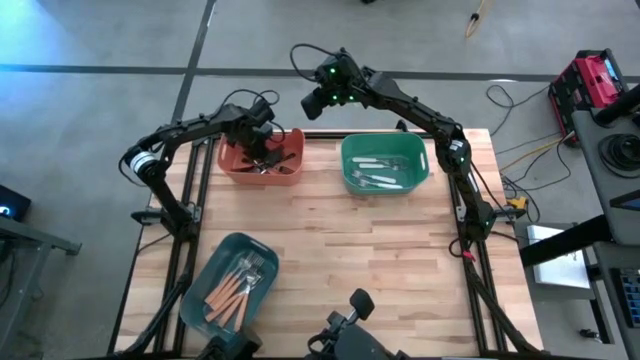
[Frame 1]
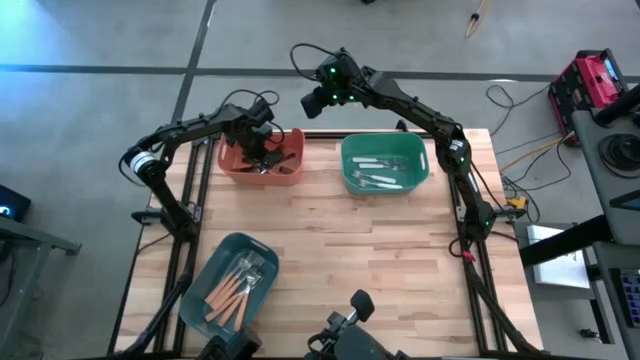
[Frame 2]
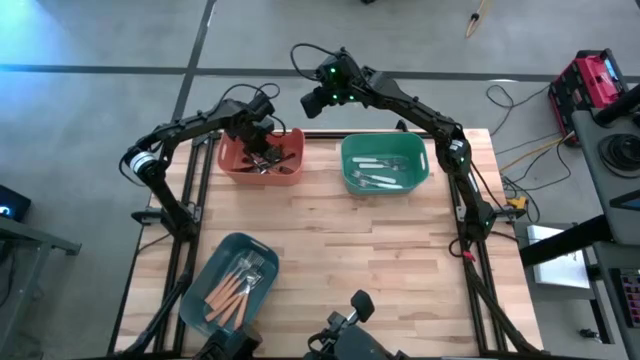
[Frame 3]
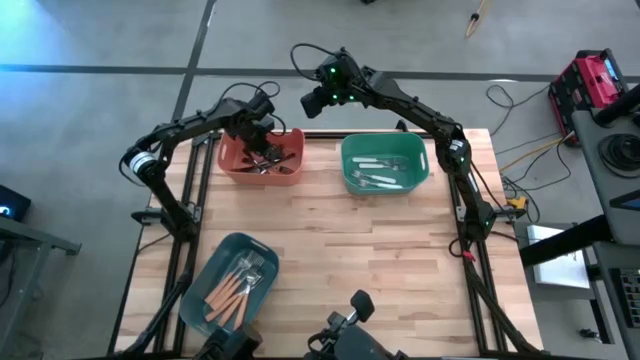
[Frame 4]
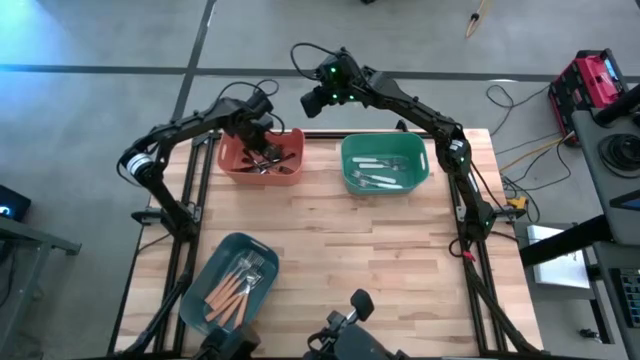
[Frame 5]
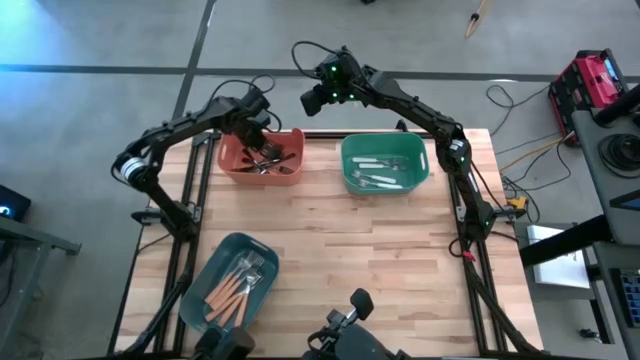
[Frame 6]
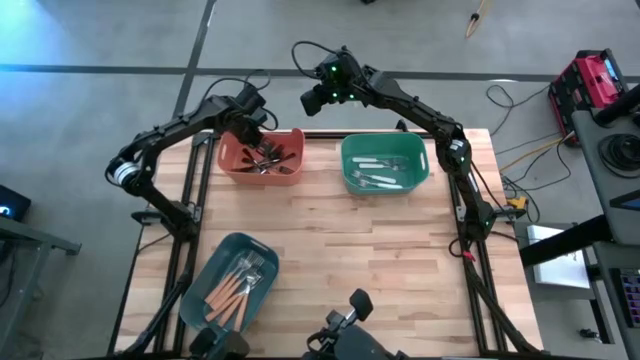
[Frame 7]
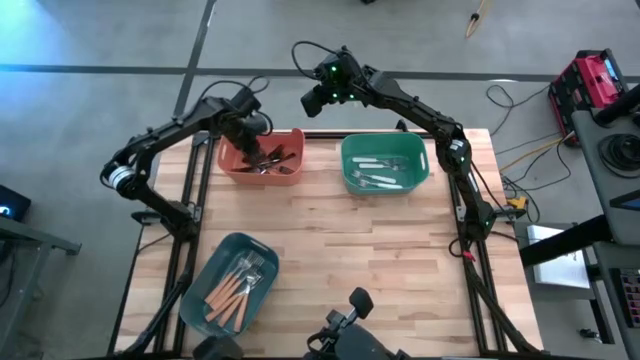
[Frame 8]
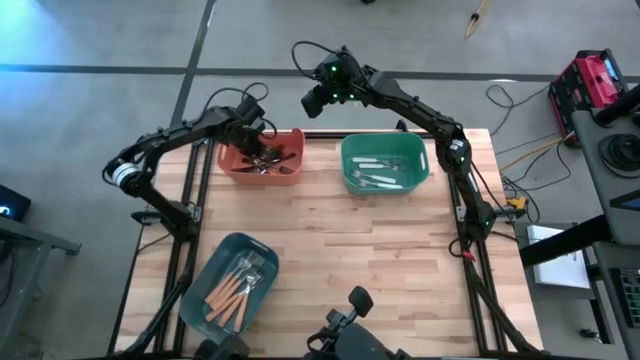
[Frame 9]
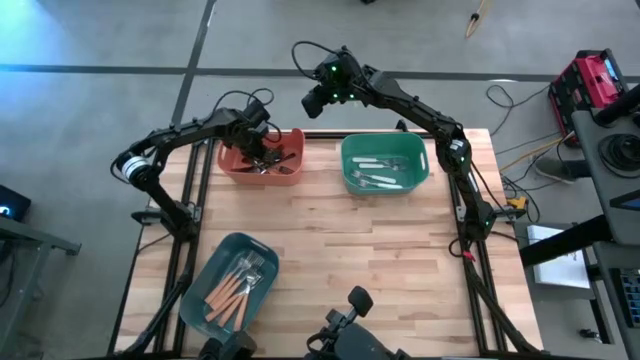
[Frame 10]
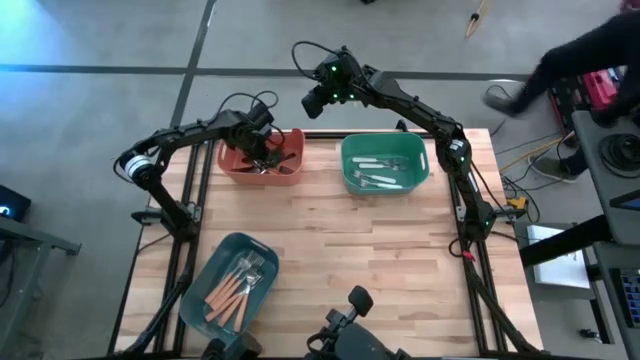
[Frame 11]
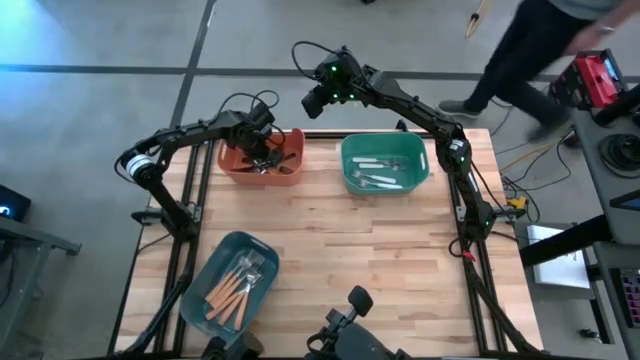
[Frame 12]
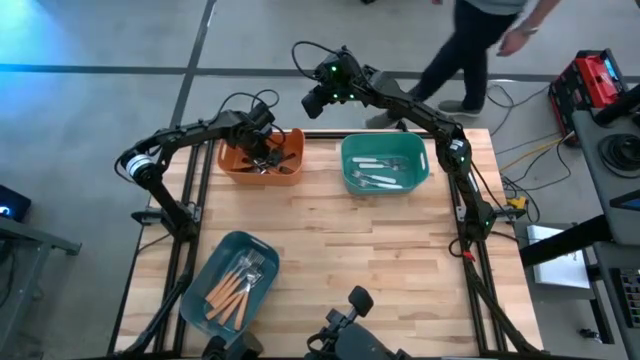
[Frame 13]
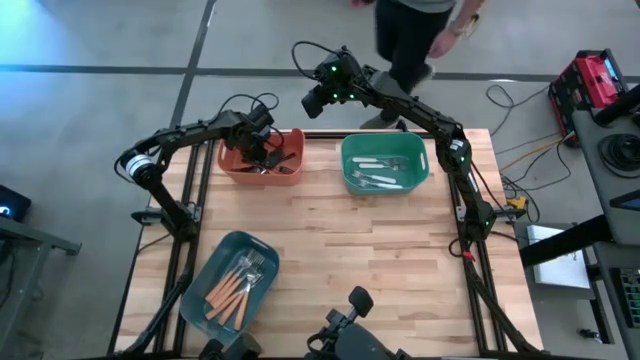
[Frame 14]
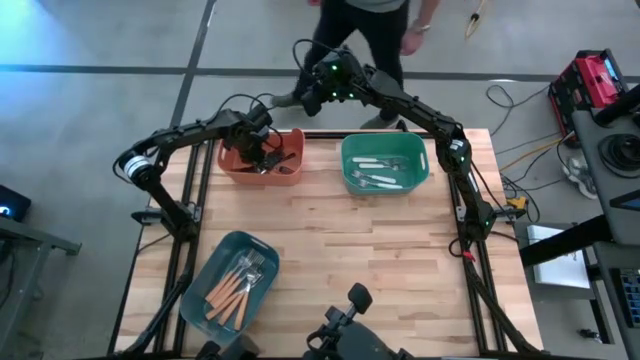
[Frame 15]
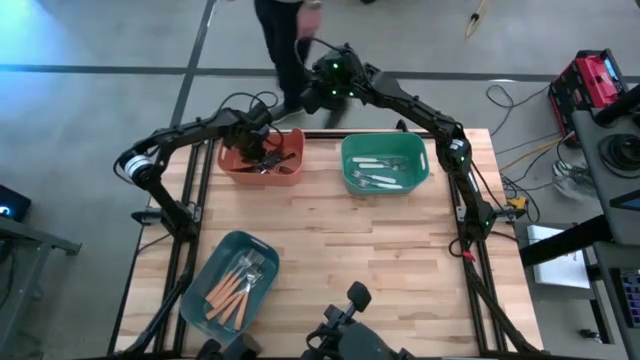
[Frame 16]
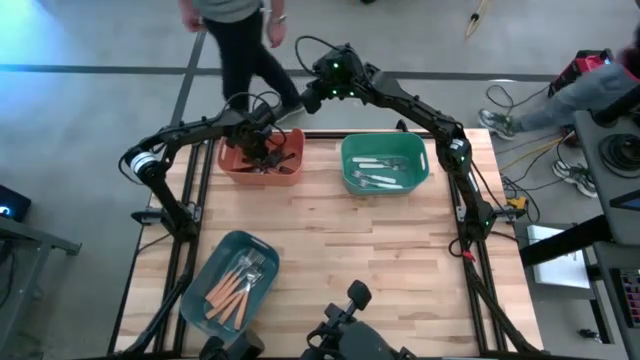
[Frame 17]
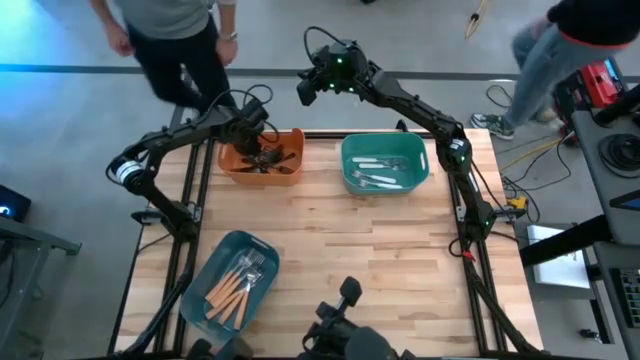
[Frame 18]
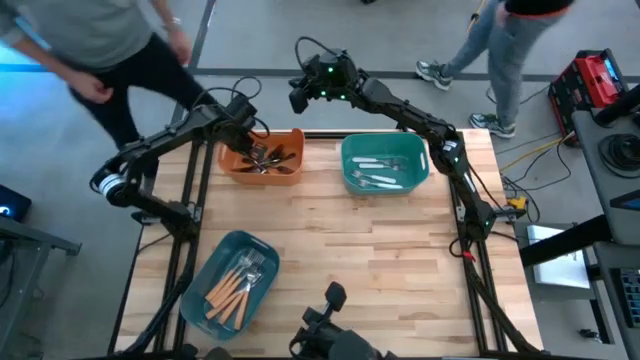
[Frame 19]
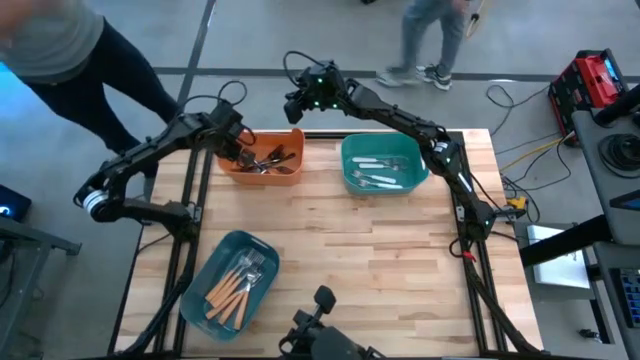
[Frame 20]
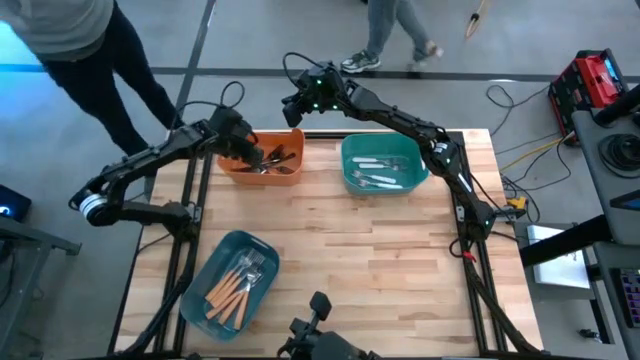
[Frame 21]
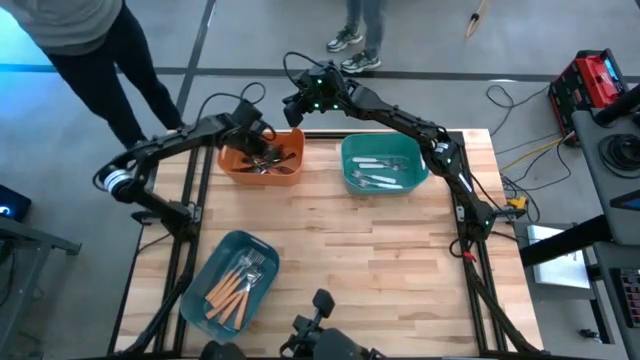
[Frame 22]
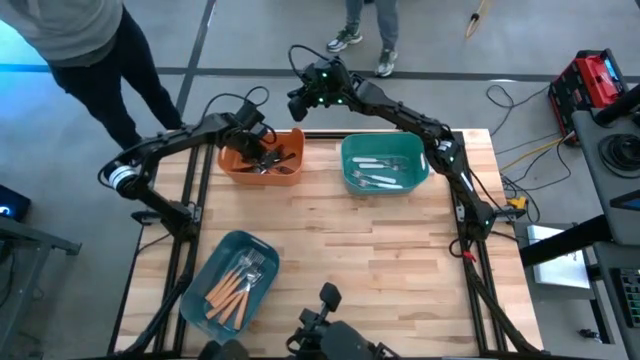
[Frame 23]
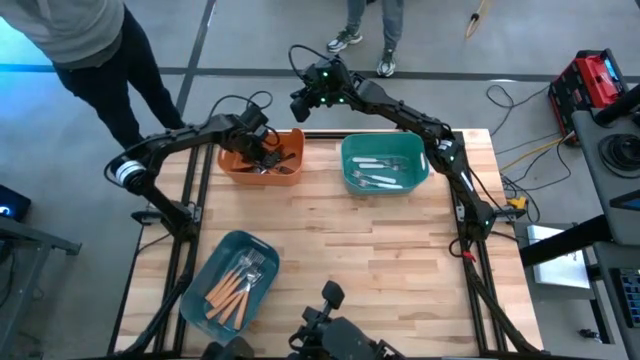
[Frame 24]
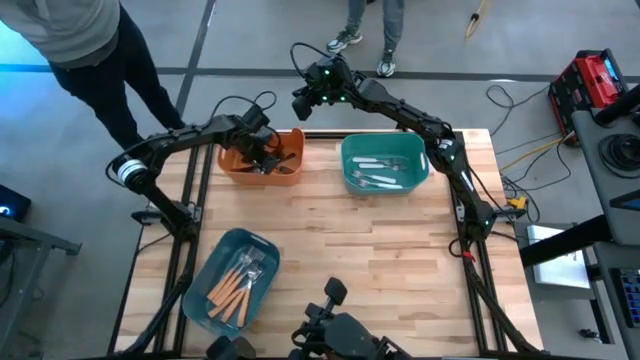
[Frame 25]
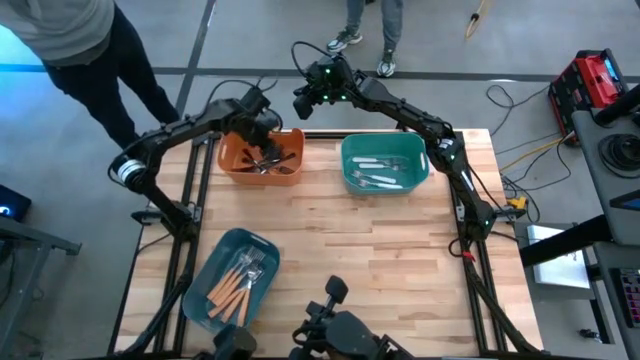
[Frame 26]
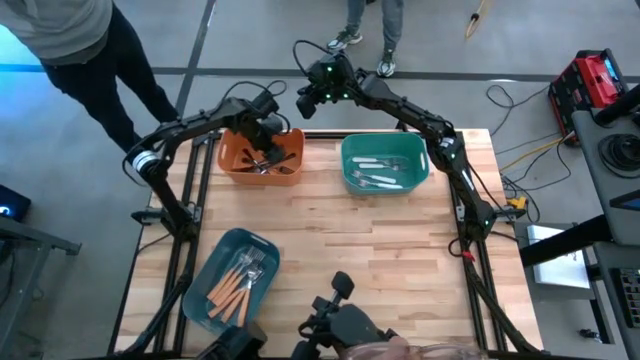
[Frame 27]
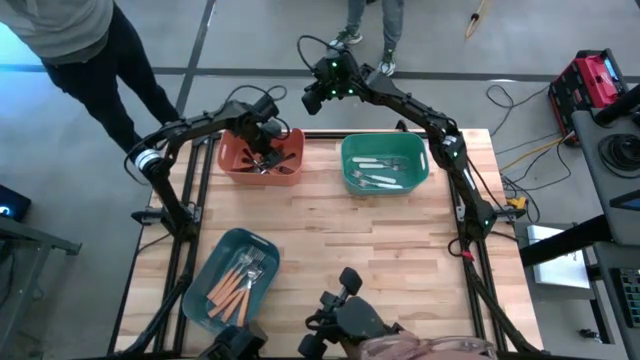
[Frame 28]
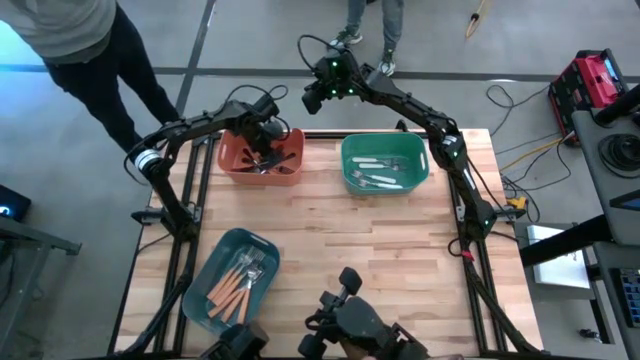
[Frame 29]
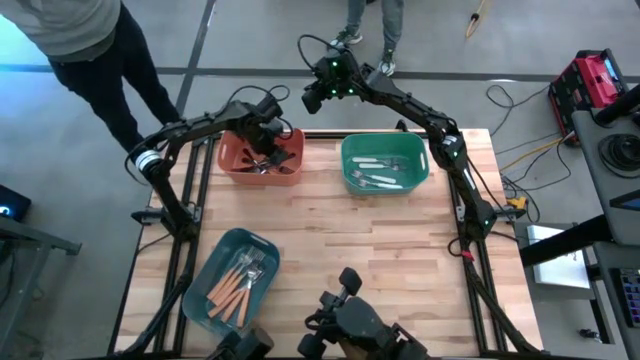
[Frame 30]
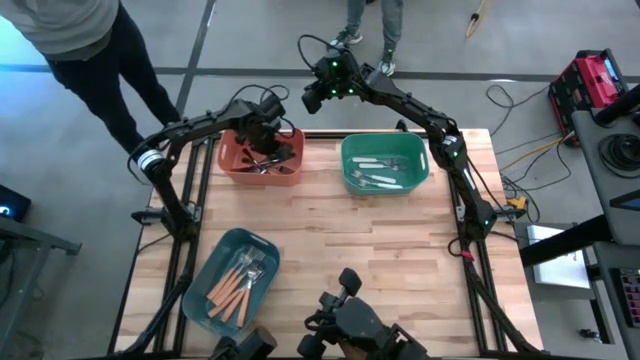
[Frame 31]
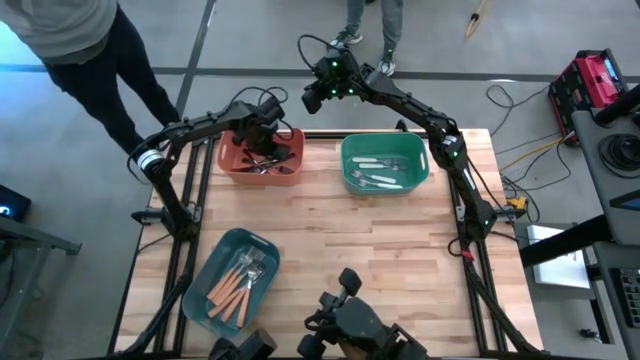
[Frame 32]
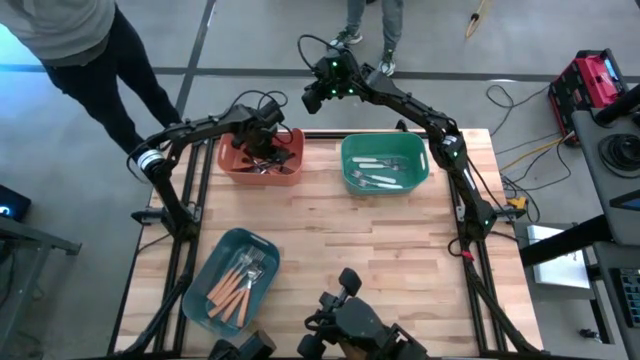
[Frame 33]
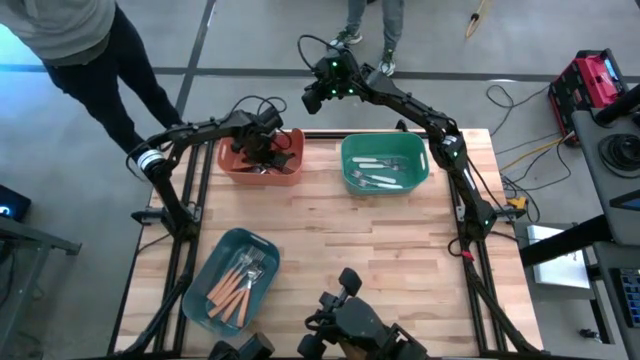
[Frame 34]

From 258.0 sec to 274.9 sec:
Task: Sort silverware by color (type)
Adjust the black forks in the orange bin
